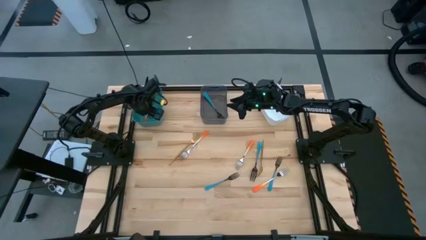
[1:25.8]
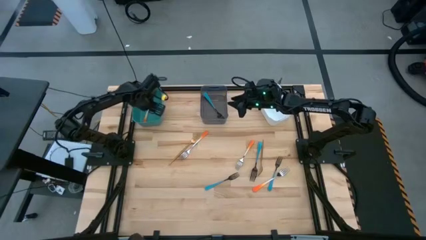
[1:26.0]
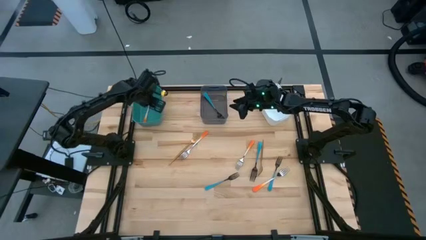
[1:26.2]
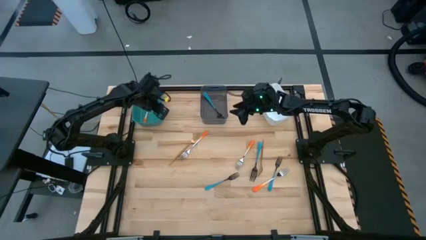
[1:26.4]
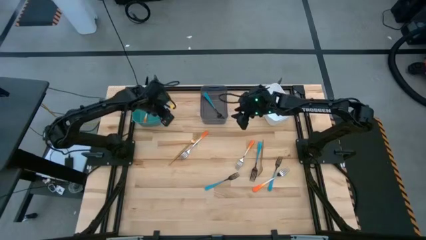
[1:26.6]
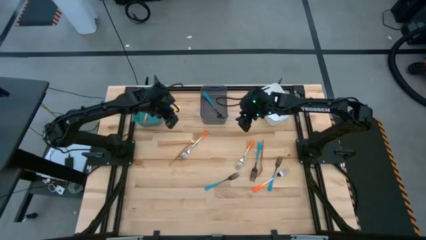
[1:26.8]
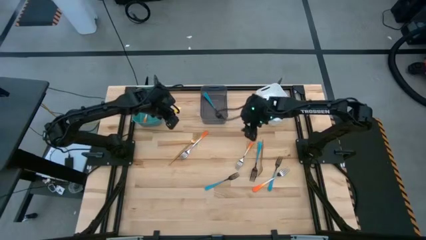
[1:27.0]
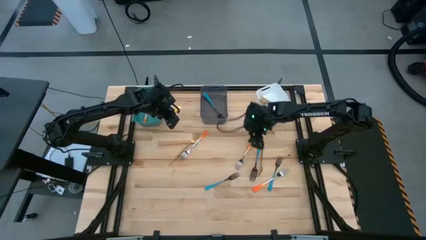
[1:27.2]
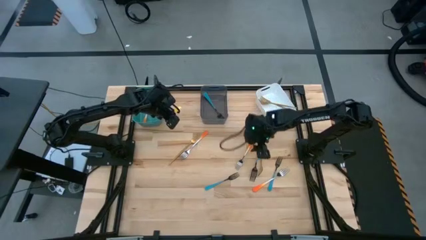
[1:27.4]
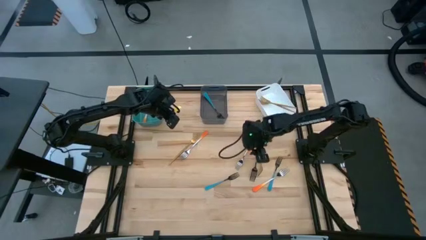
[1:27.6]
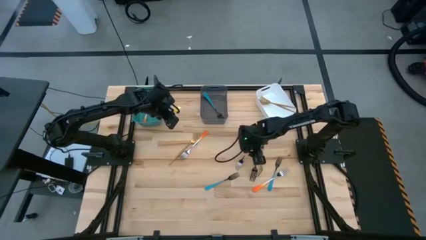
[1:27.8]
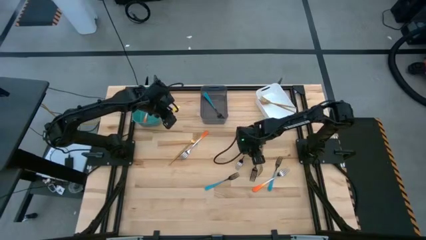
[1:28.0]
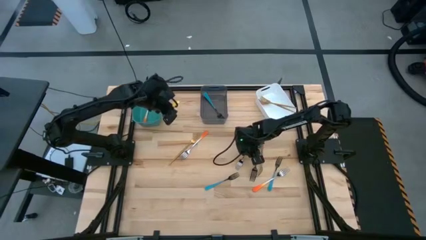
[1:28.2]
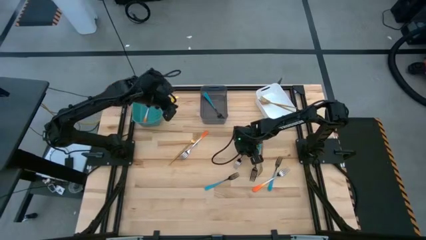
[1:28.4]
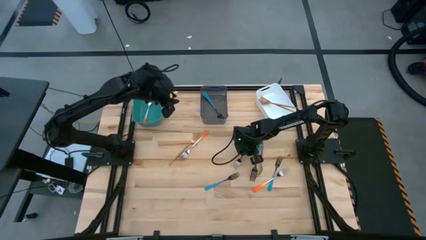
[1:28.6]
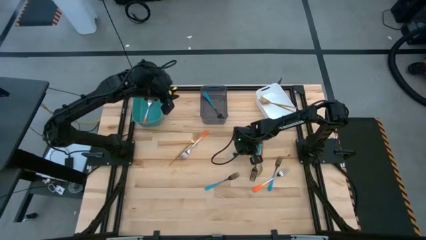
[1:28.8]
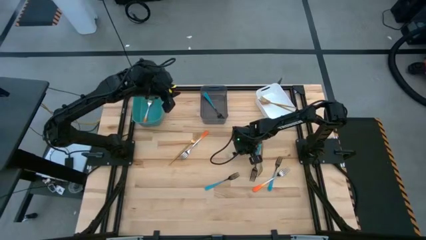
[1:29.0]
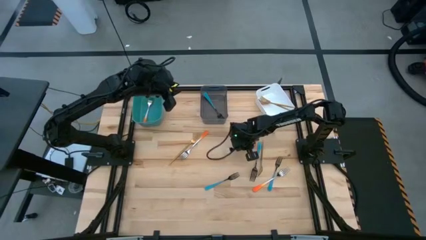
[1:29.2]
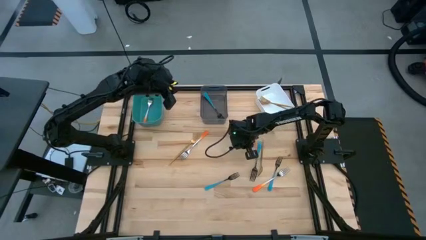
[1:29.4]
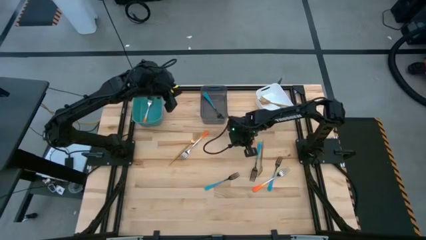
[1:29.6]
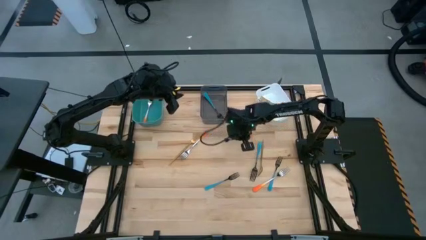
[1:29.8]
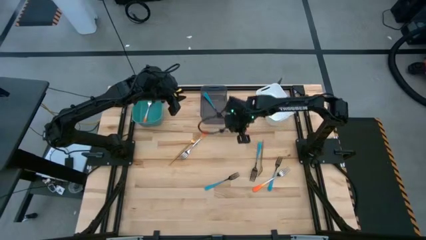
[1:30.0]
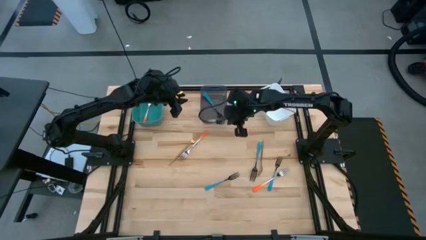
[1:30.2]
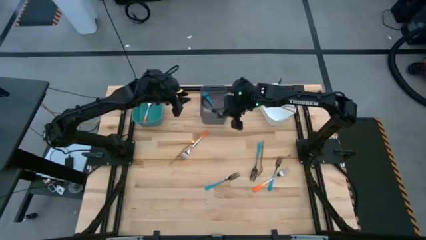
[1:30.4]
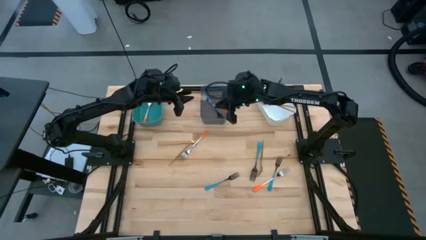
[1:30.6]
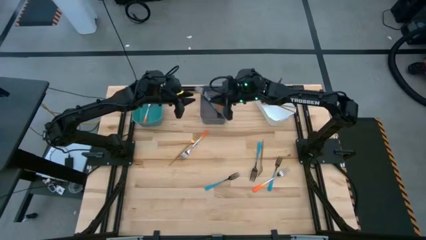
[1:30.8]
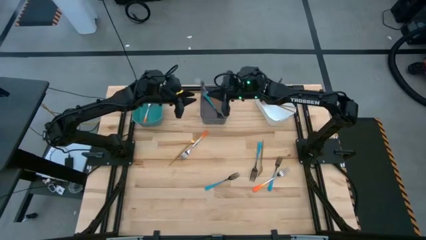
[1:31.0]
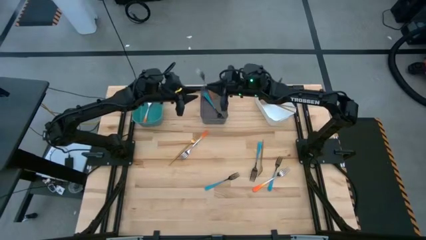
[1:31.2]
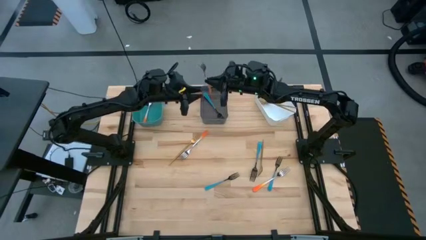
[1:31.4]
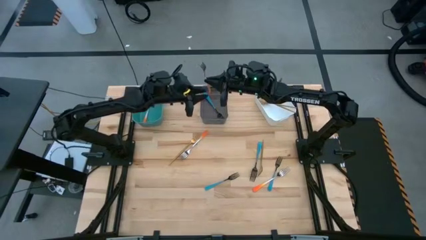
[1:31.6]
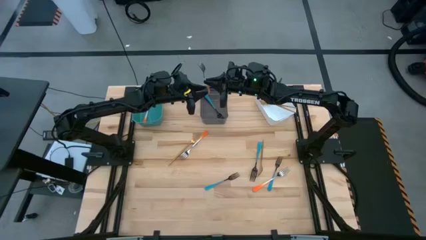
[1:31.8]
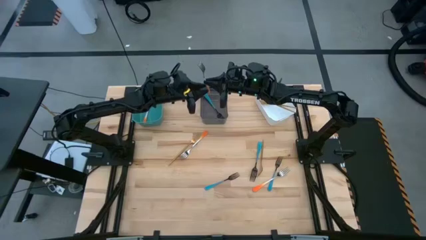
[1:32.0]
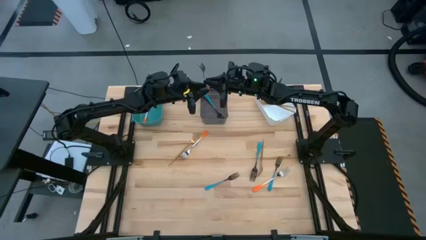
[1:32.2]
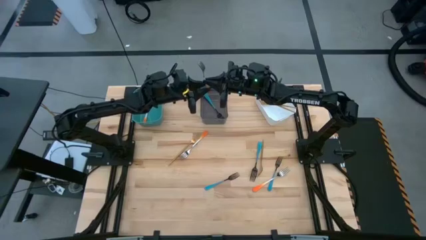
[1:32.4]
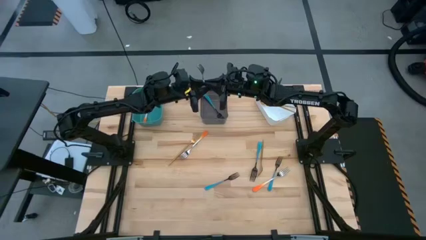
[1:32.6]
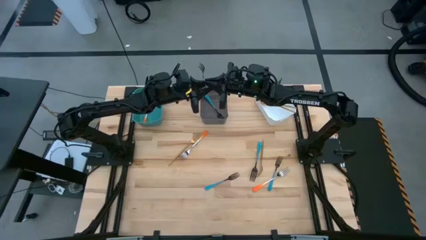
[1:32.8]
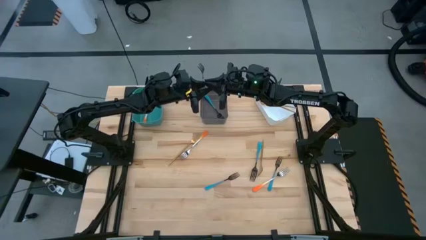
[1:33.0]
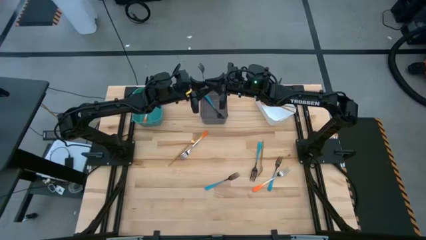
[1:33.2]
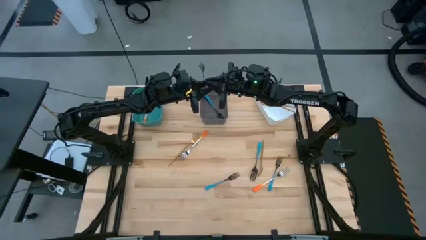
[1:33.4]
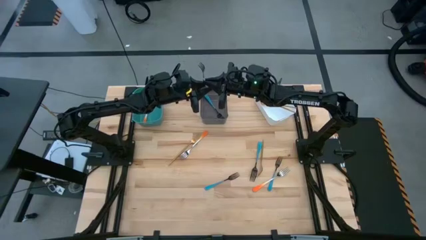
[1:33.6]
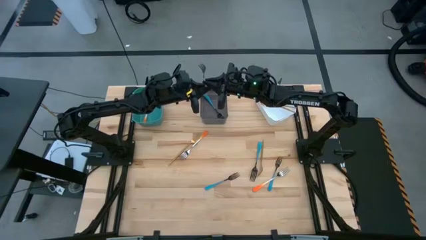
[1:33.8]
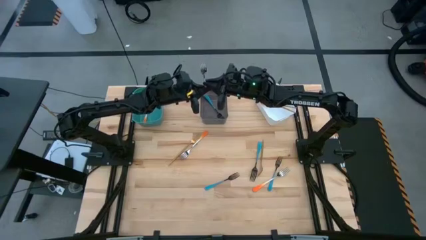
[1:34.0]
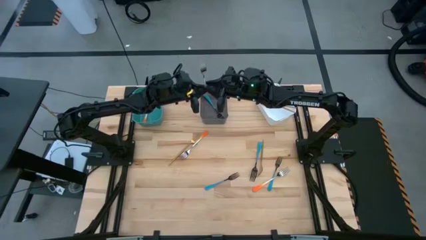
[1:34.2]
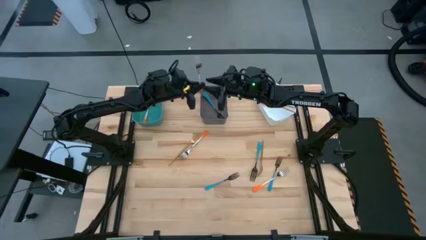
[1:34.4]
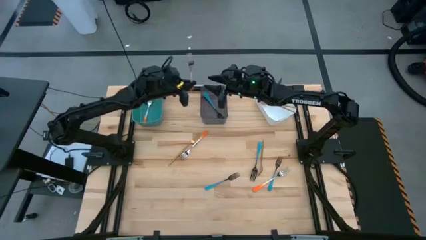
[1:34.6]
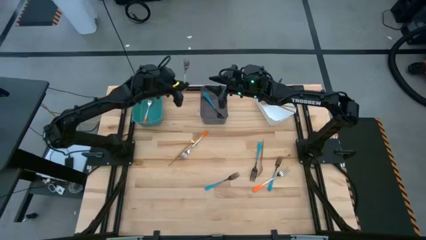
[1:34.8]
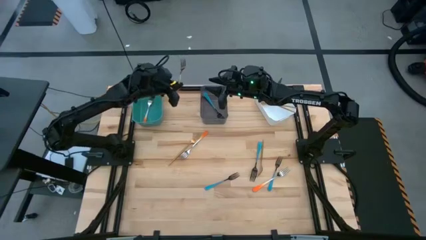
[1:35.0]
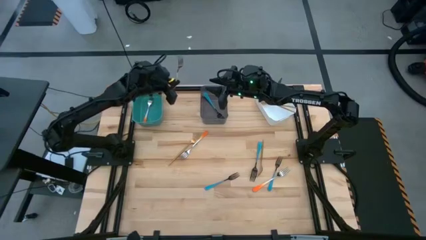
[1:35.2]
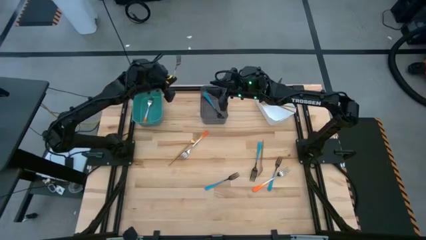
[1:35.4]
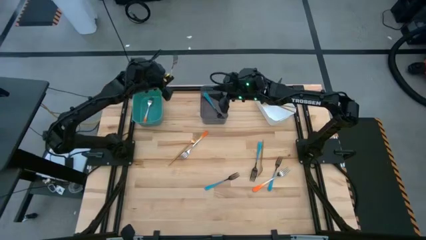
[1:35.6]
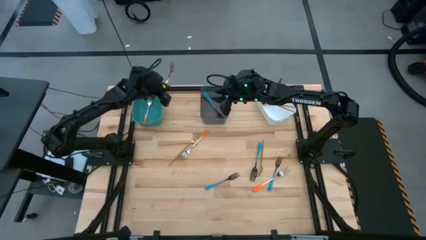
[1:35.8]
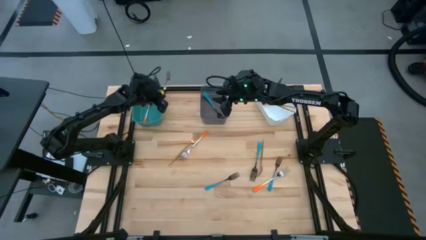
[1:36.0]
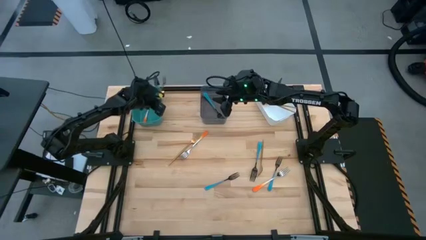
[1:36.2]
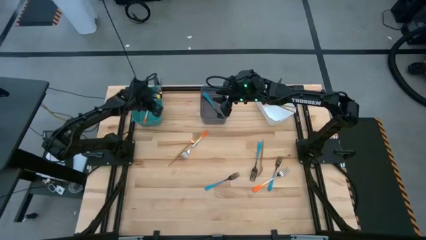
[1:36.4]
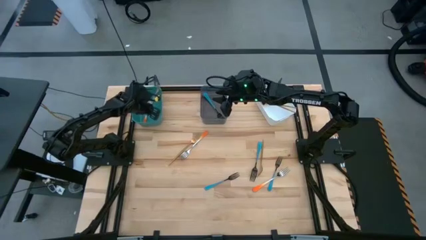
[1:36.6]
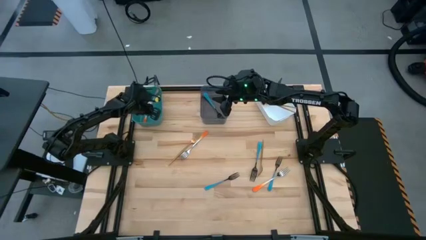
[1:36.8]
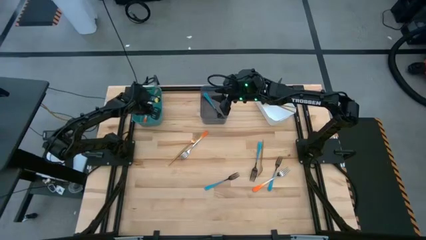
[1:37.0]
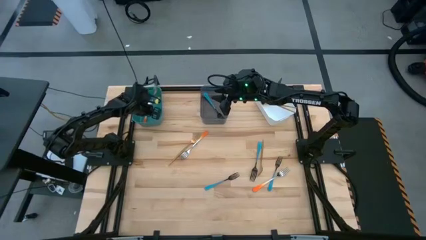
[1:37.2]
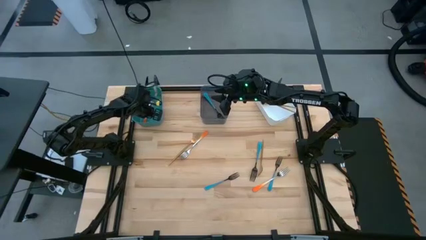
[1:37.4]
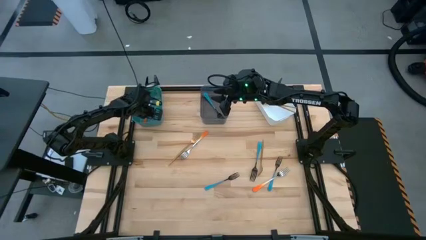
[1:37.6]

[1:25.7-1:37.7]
Task: Sort silverware by color (type)
Put the top right orange fork into the green bin
